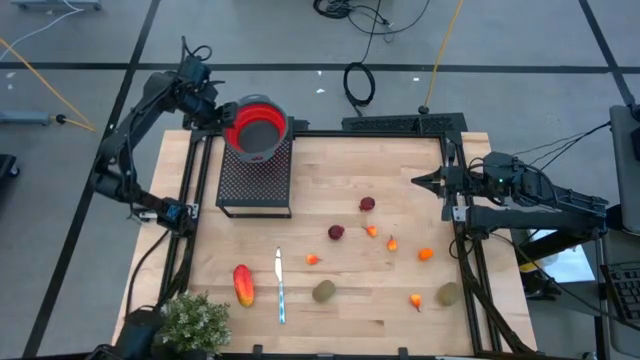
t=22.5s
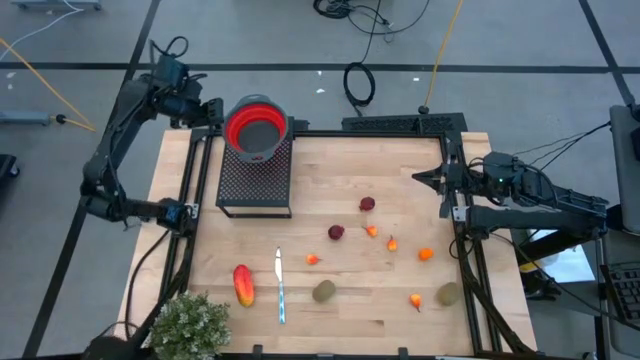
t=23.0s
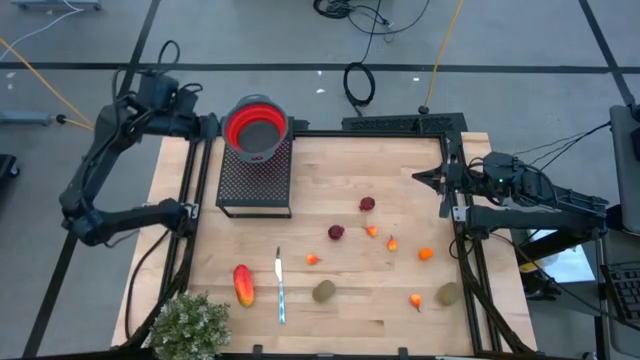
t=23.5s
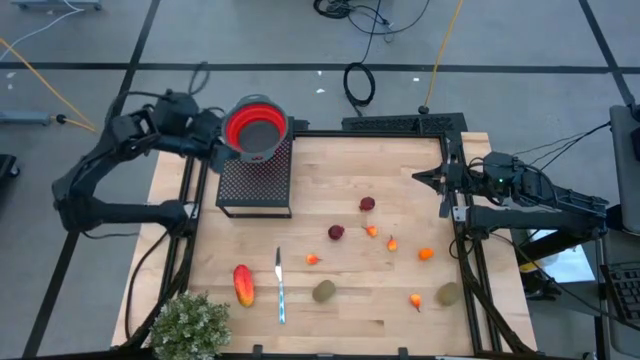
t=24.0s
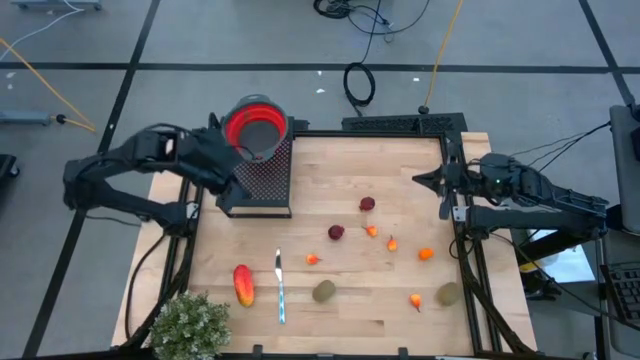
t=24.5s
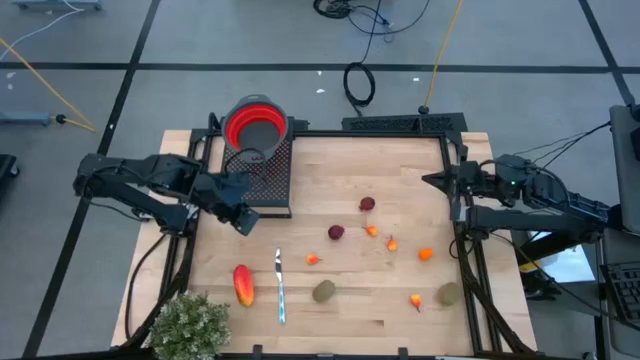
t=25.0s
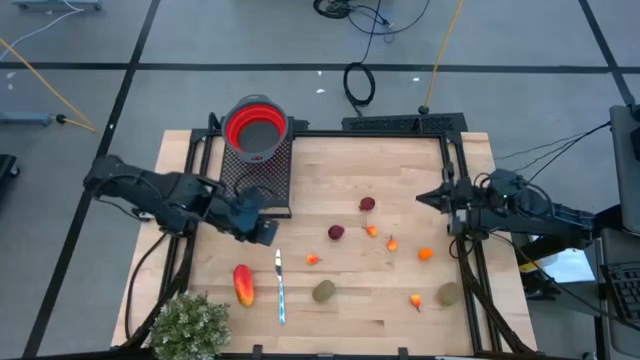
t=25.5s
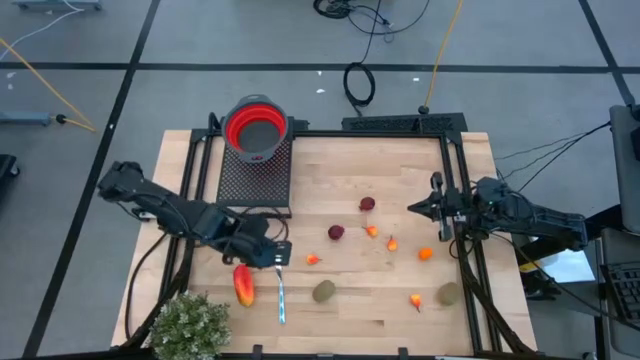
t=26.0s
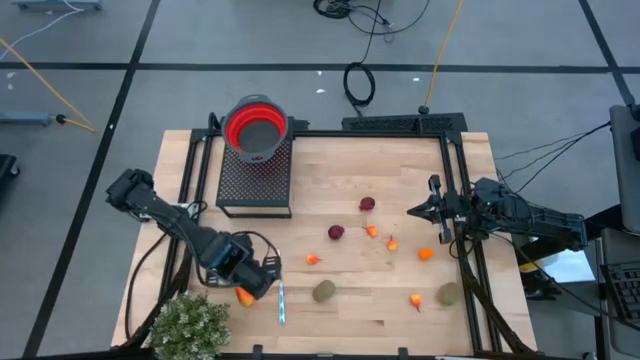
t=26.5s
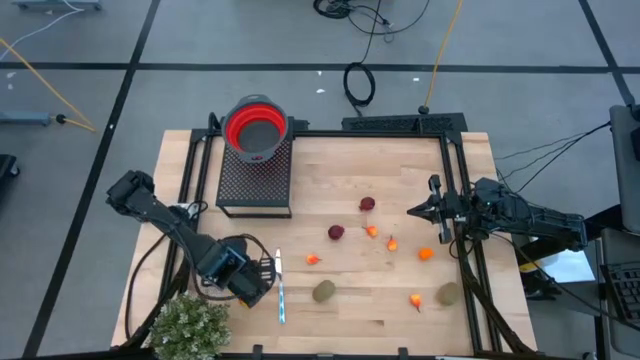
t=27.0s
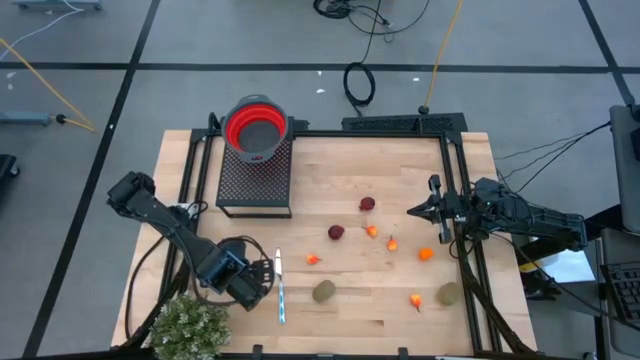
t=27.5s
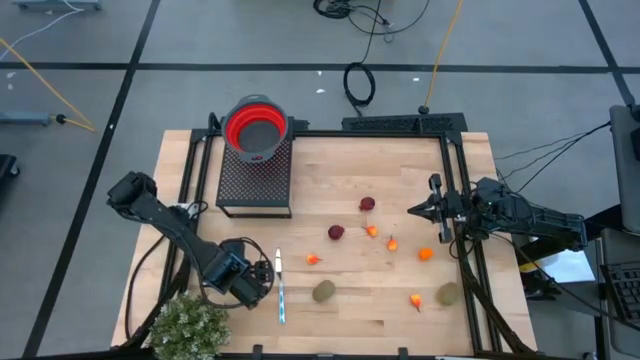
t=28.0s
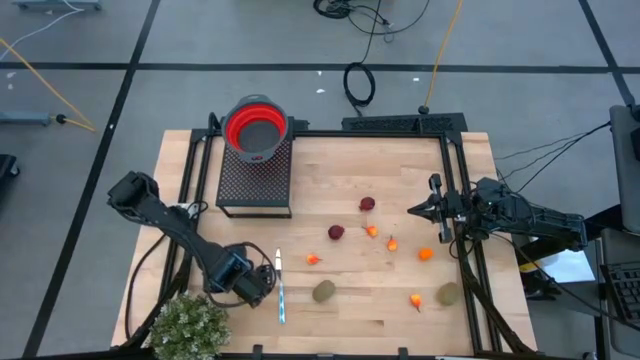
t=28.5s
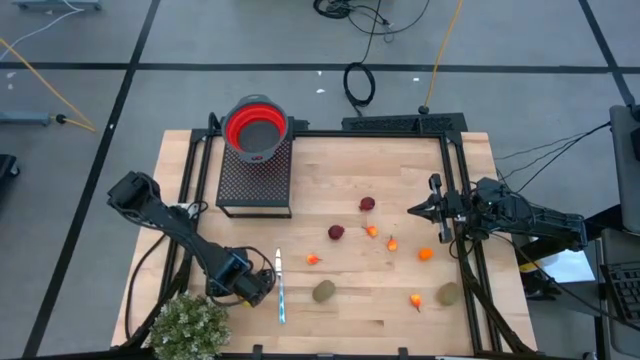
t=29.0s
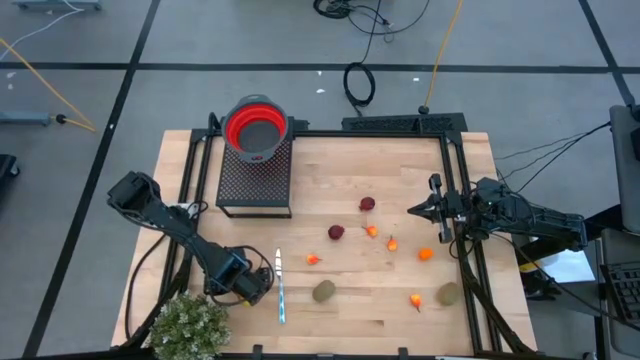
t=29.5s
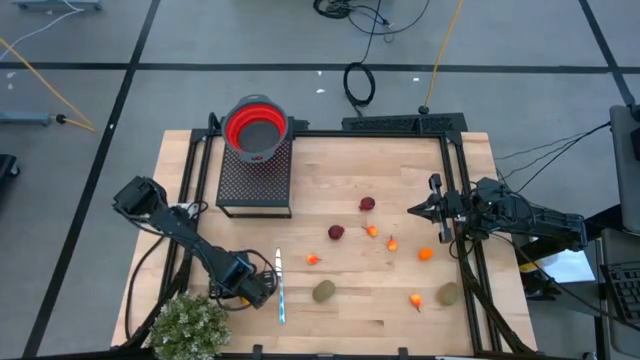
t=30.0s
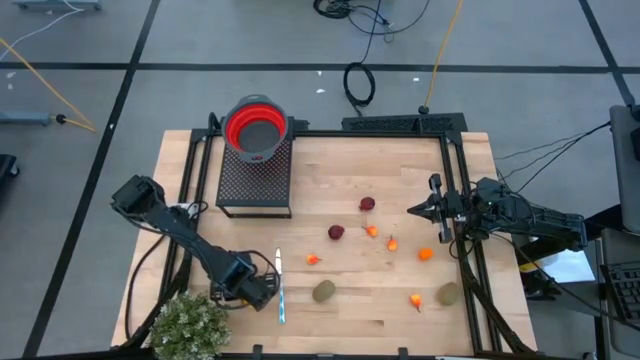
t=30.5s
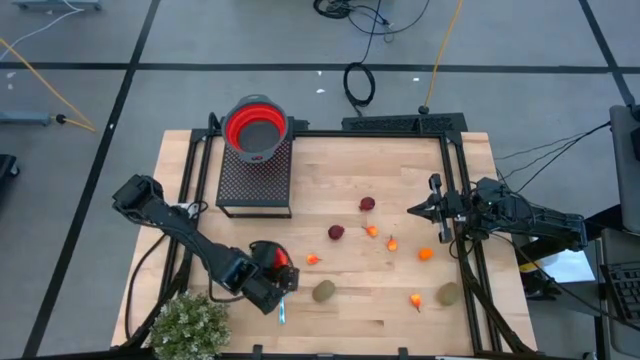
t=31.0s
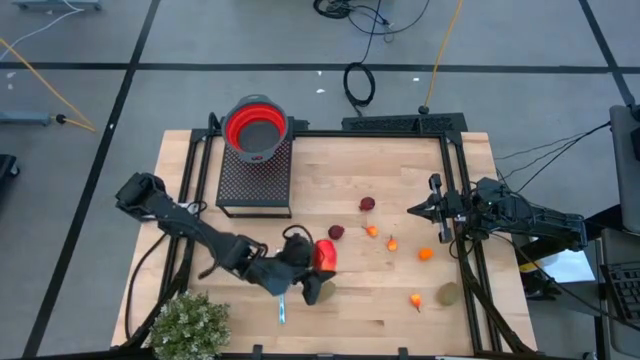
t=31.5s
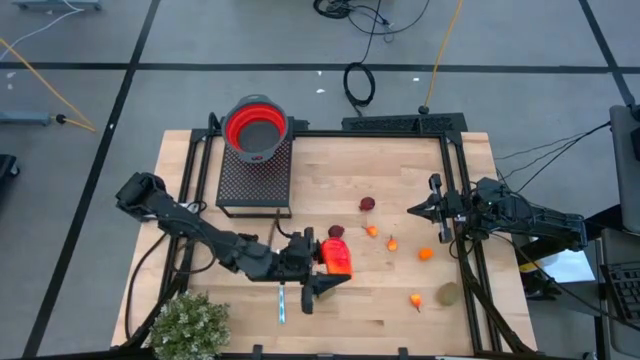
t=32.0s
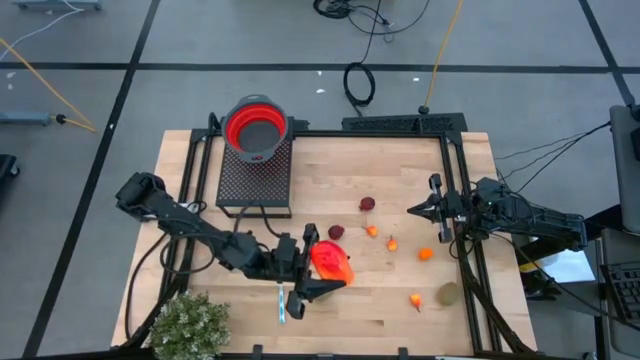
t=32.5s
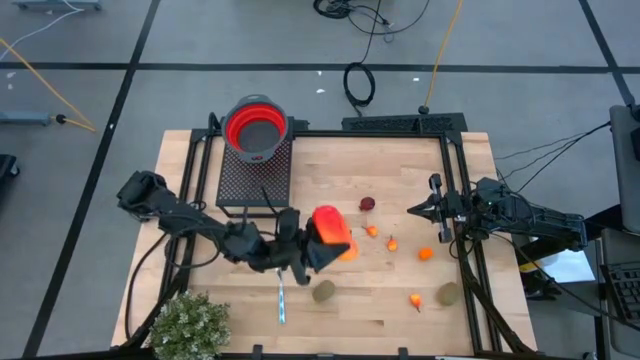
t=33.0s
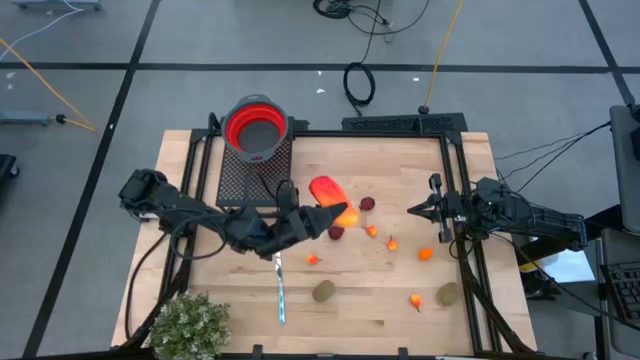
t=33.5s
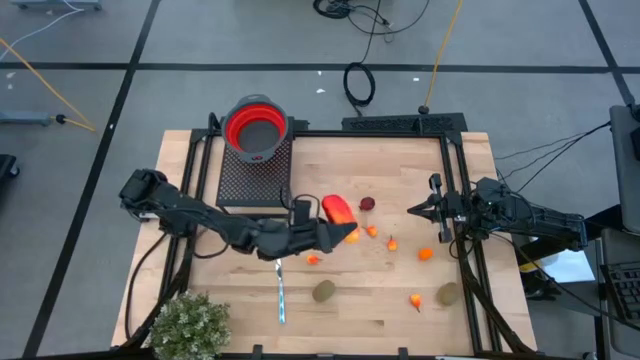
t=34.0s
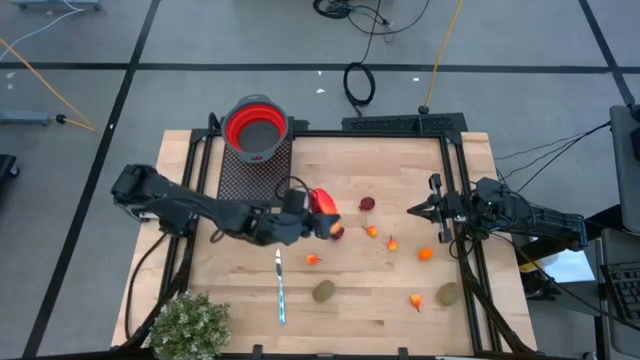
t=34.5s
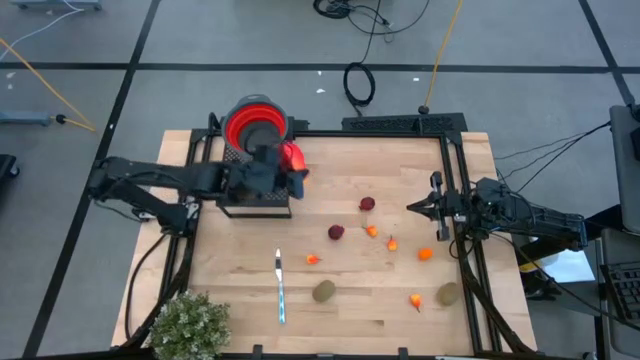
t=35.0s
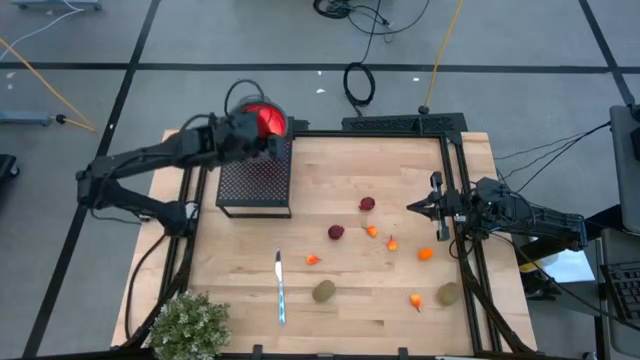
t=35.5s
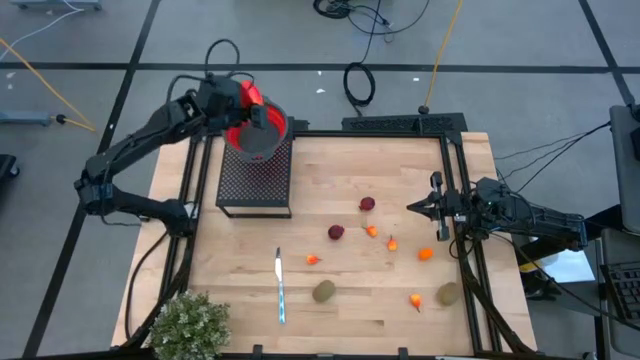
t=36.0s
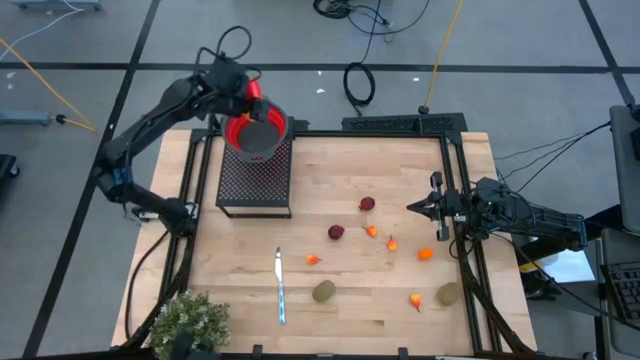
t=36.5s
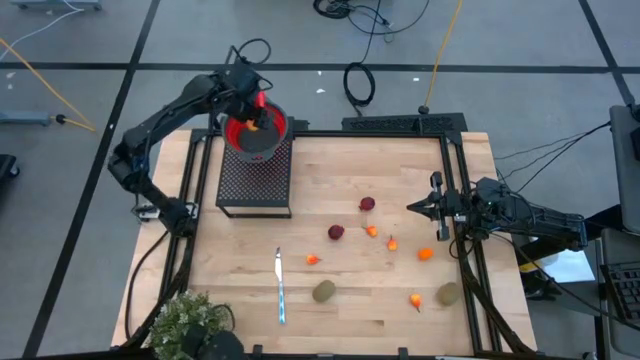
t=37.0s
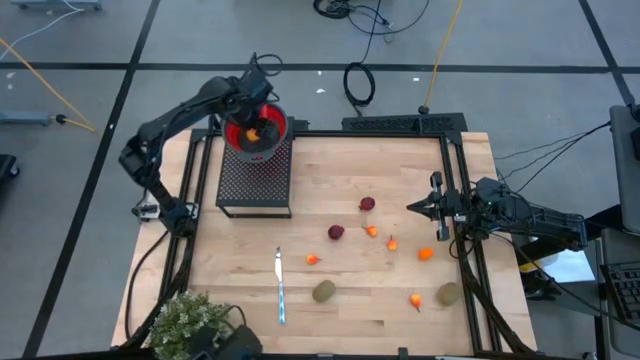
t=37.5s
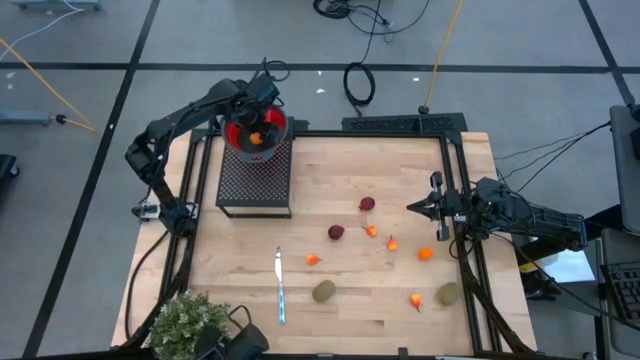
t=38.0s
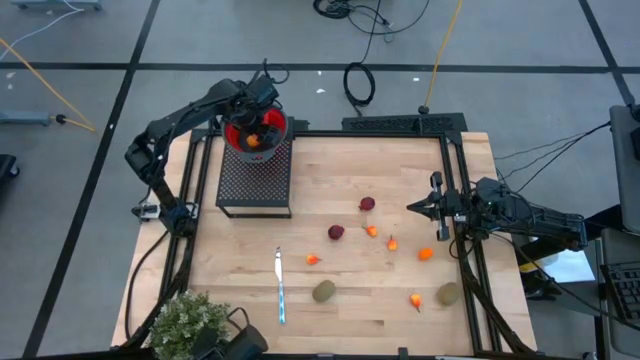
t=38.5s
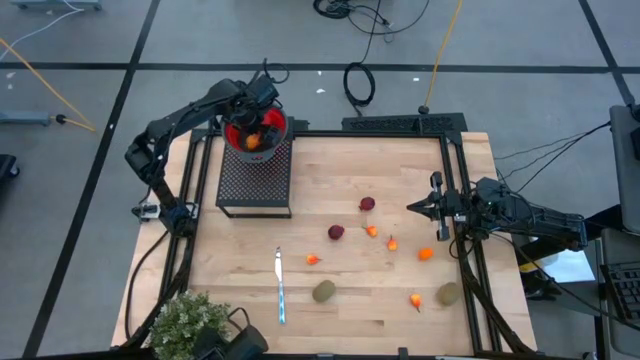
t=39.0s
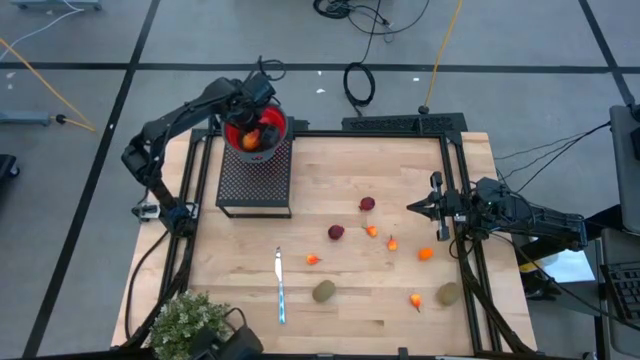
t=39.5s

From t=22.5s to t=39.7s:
Task: Pick & Place Fruit
Put the mango into the red strainer bowl on the shelf

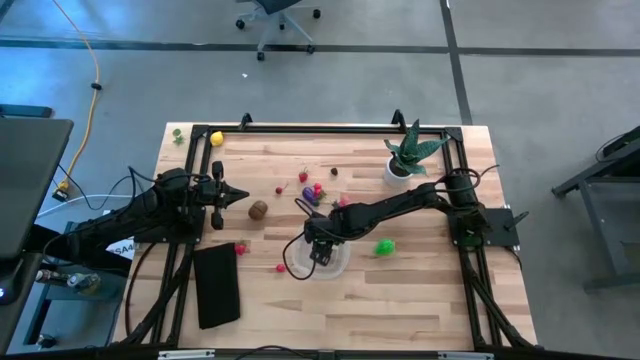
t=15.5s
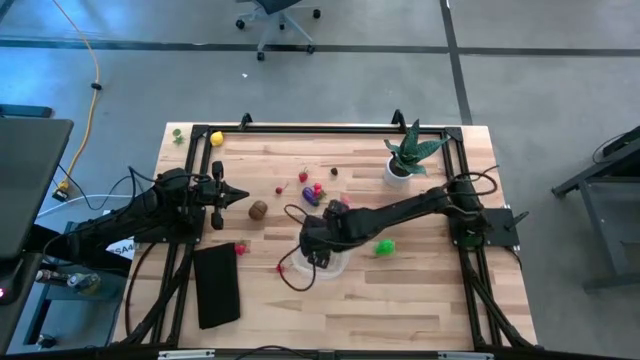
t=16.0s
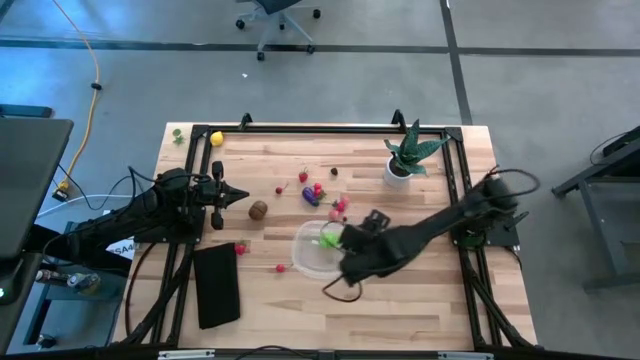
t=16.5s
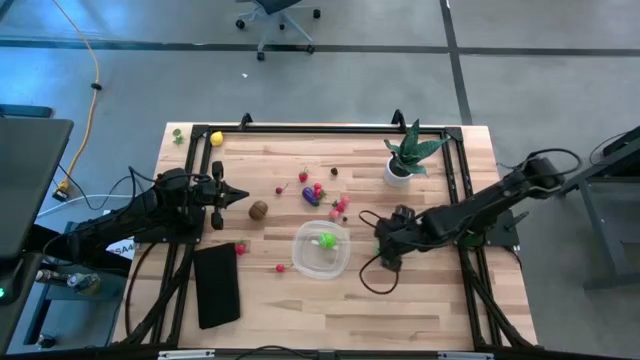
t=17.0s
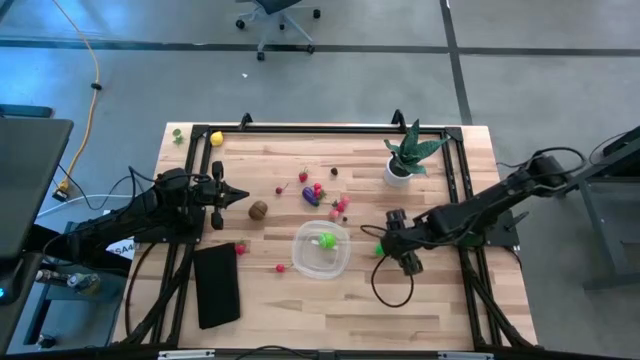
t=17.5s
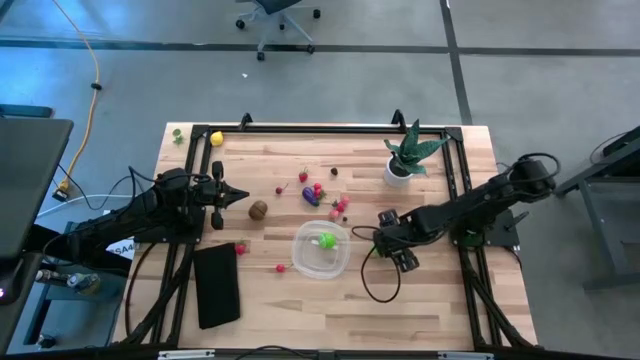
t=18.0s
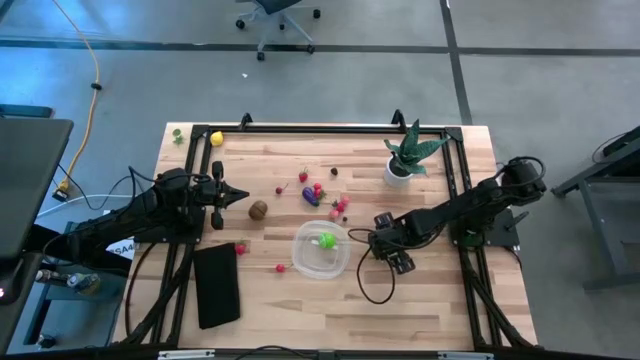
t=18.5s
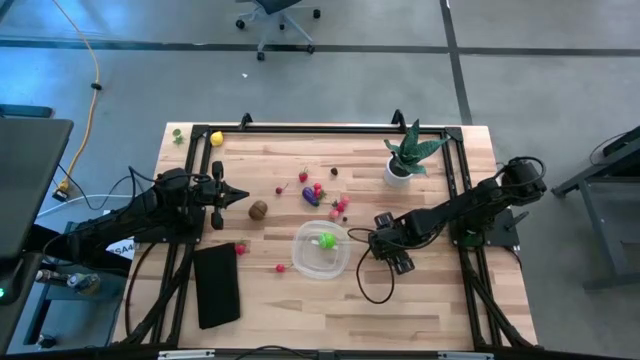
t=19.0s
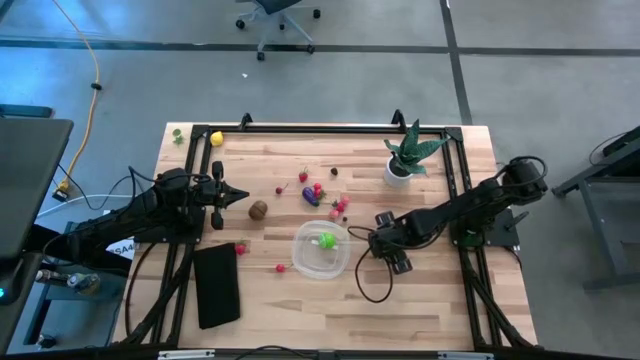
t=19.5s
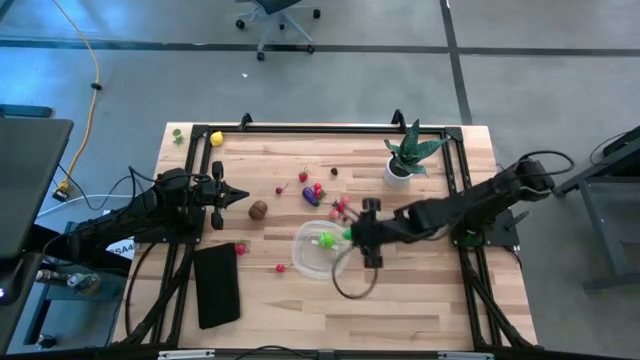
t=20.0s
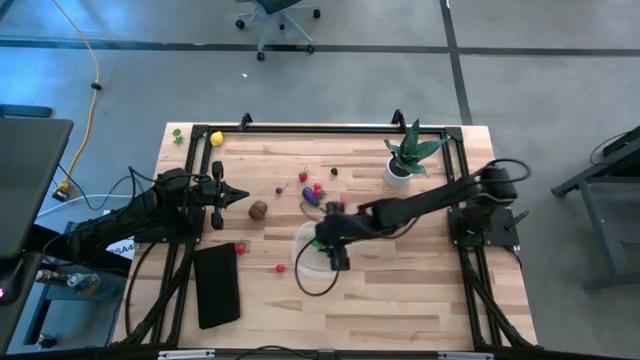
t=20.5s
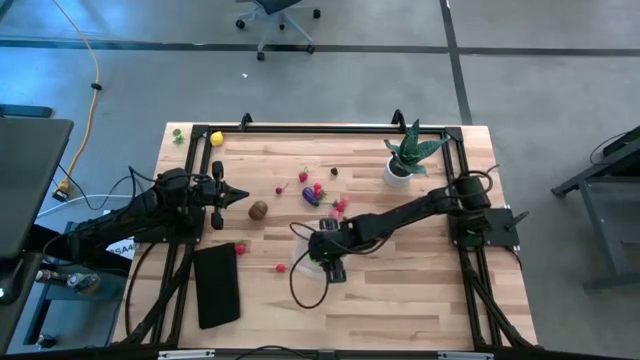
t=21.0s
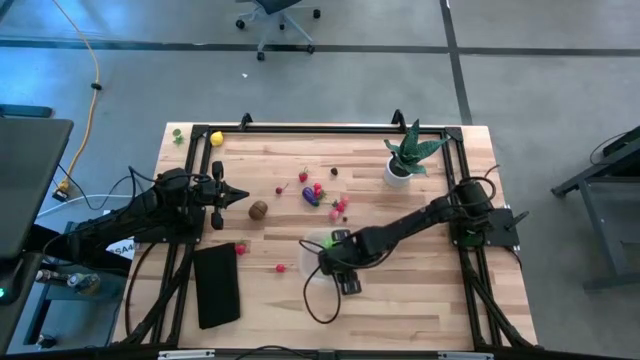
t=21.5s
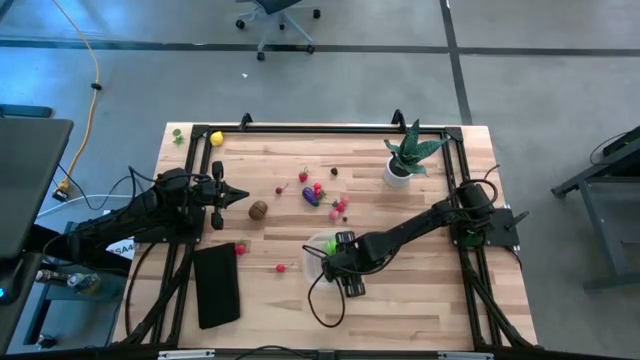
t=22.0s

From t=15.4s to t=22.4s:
Task: Pick and placing Produce into tupperware
Put the green pear into the transparent container
